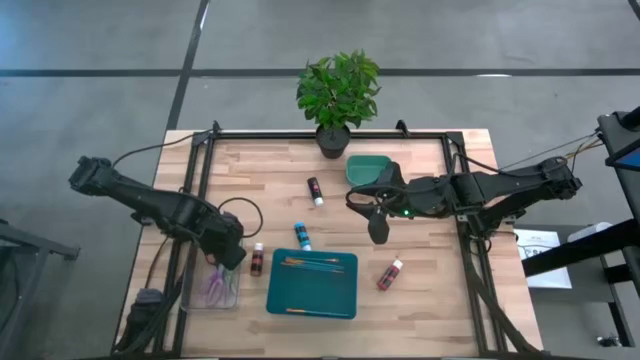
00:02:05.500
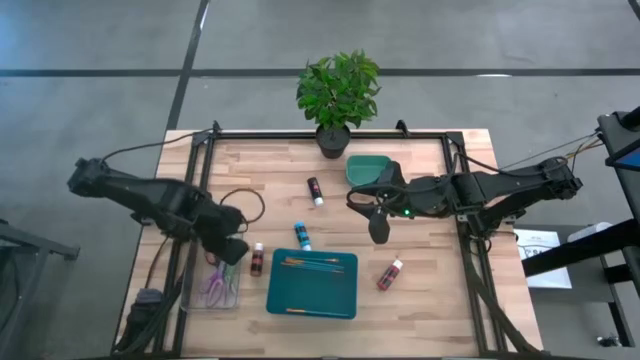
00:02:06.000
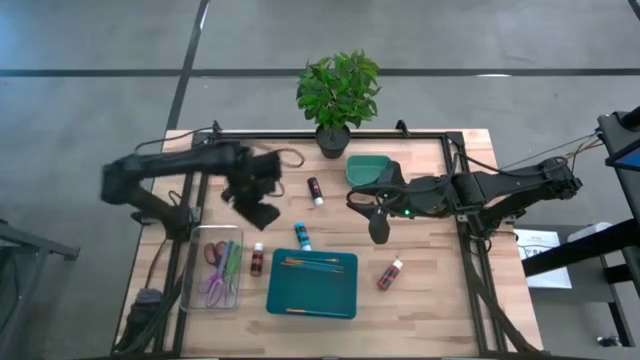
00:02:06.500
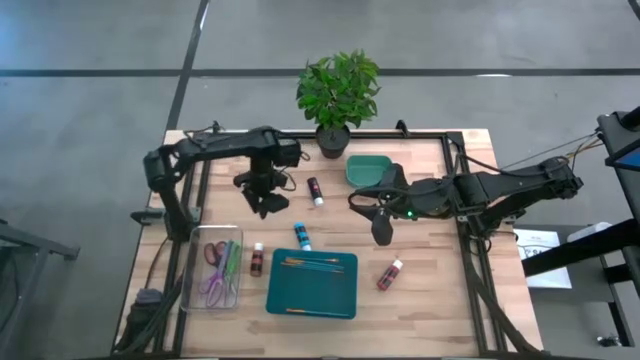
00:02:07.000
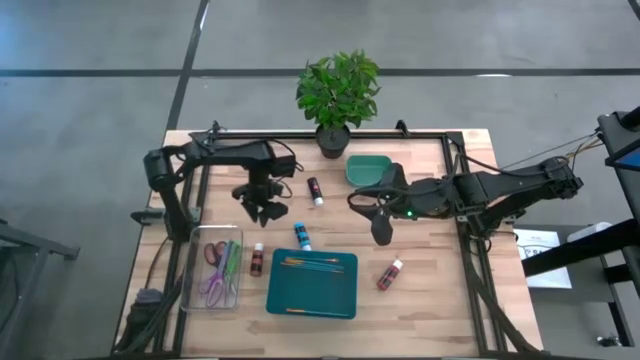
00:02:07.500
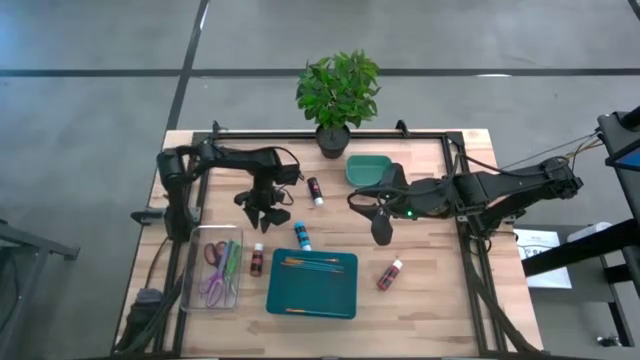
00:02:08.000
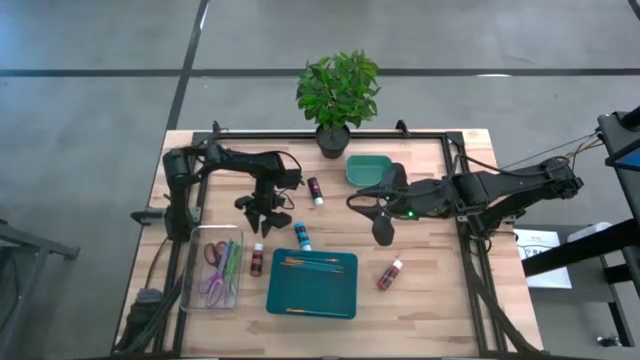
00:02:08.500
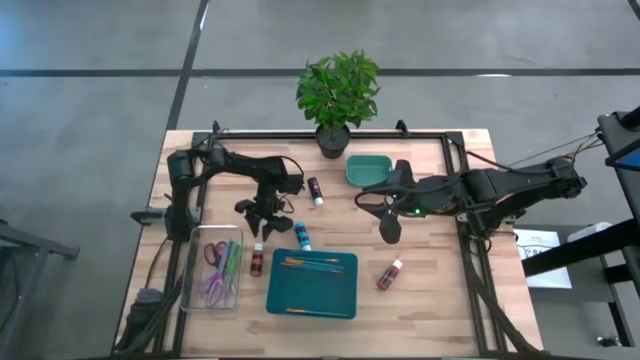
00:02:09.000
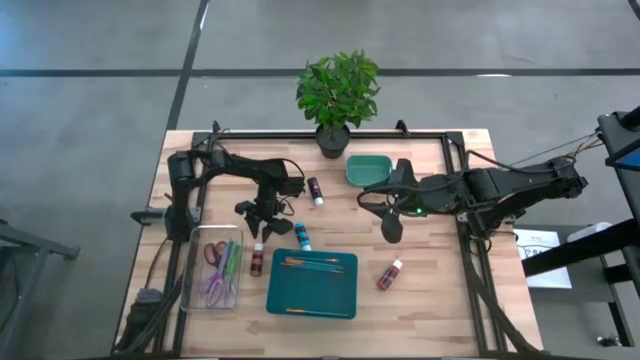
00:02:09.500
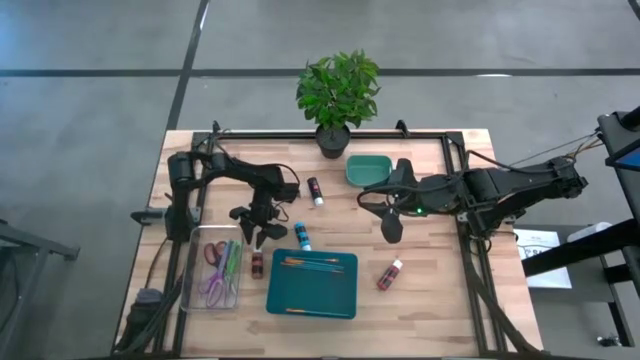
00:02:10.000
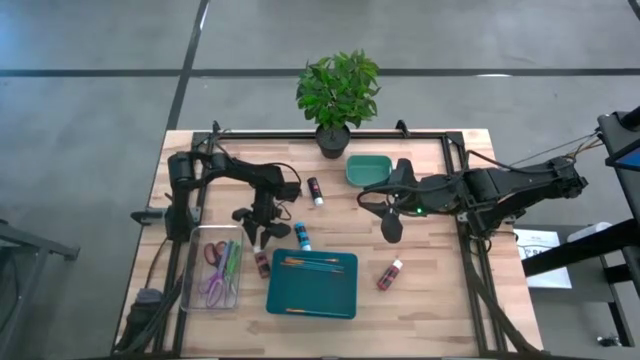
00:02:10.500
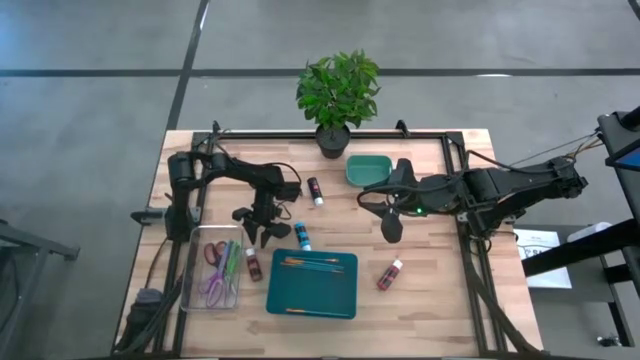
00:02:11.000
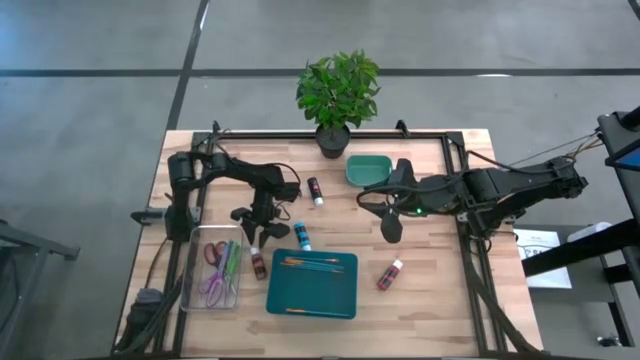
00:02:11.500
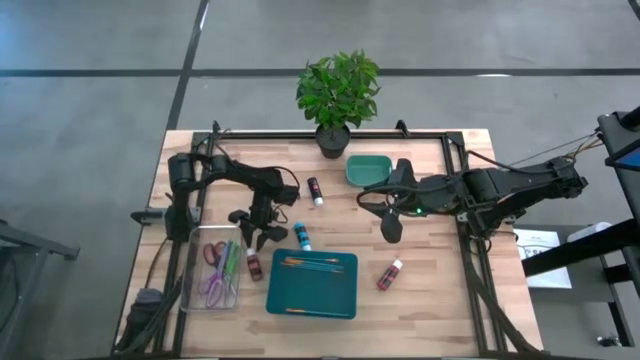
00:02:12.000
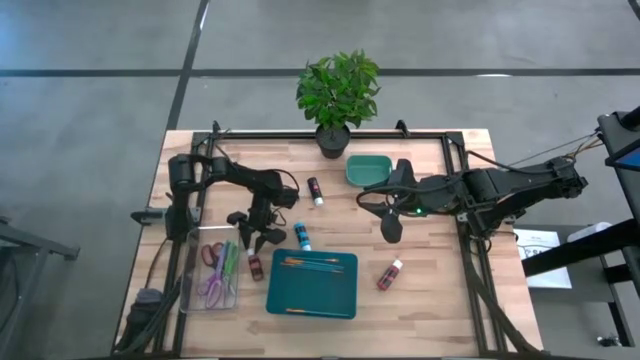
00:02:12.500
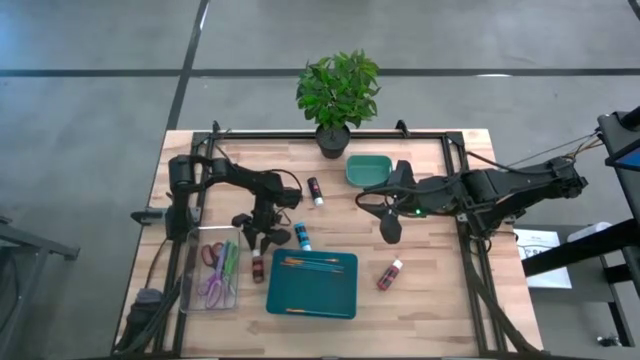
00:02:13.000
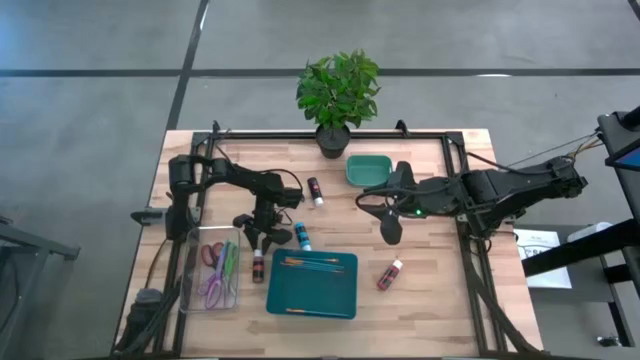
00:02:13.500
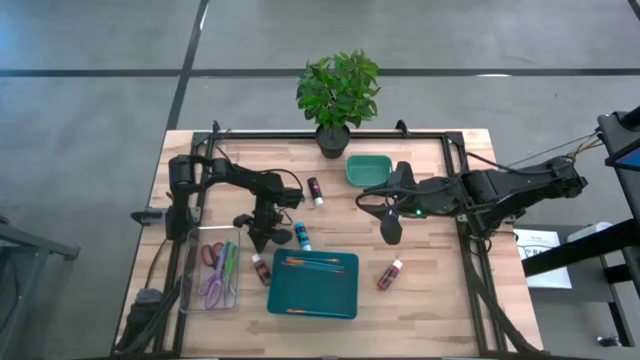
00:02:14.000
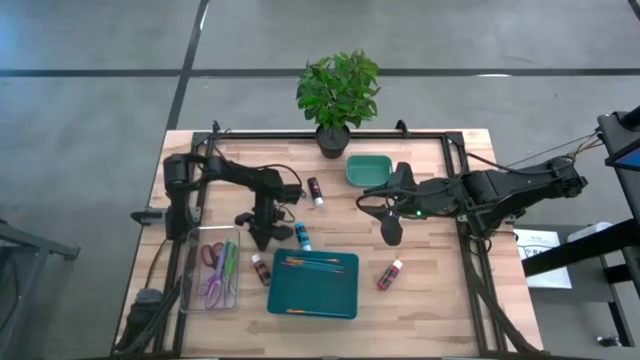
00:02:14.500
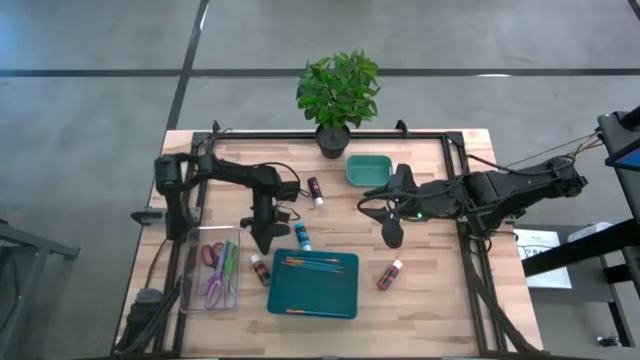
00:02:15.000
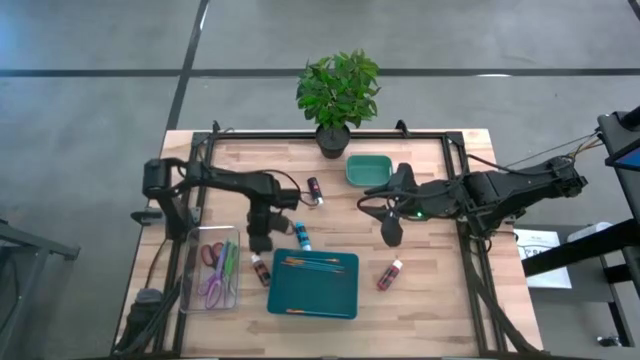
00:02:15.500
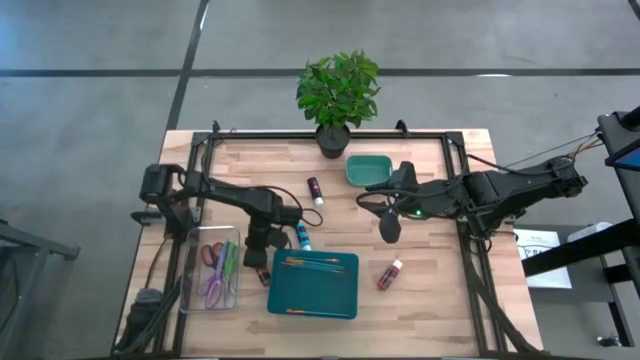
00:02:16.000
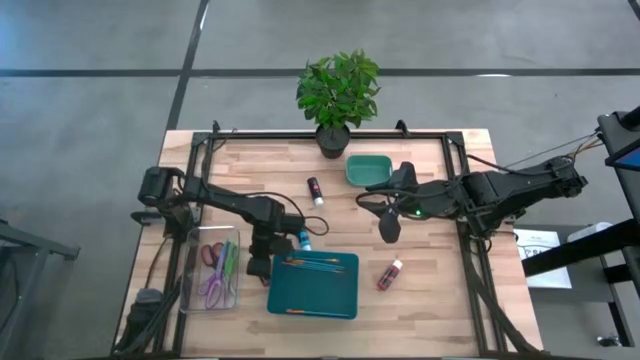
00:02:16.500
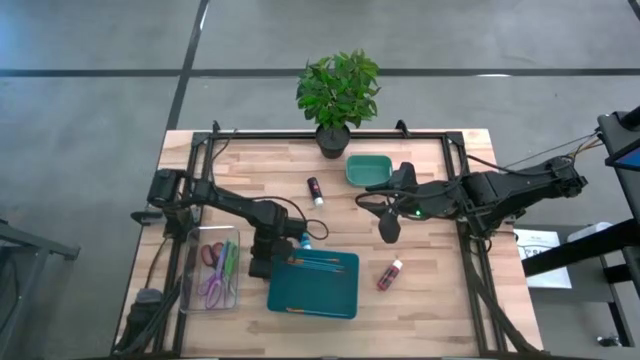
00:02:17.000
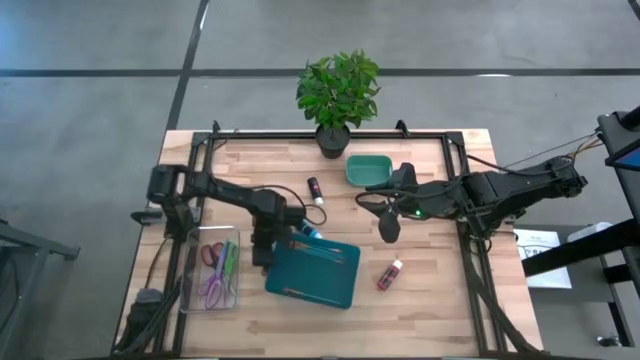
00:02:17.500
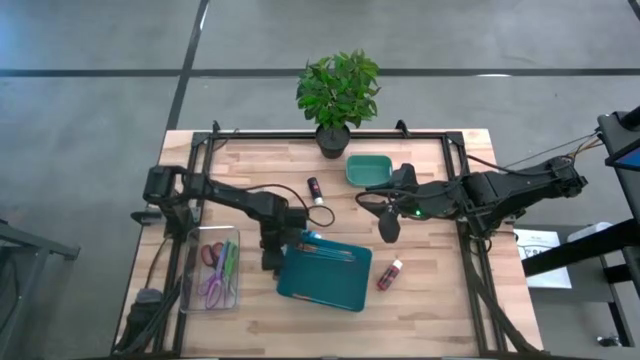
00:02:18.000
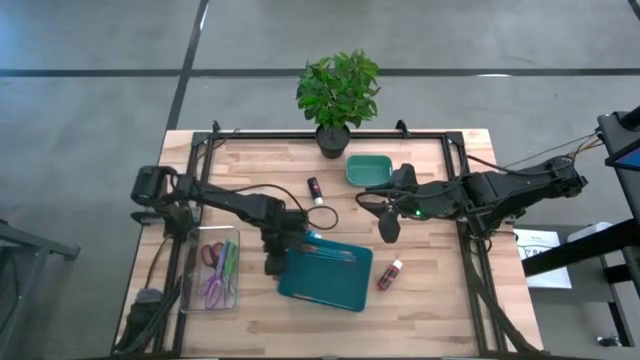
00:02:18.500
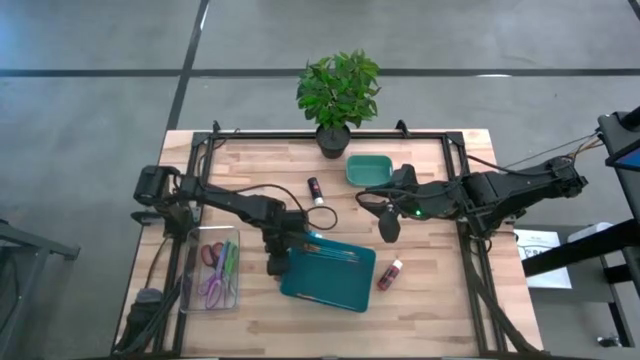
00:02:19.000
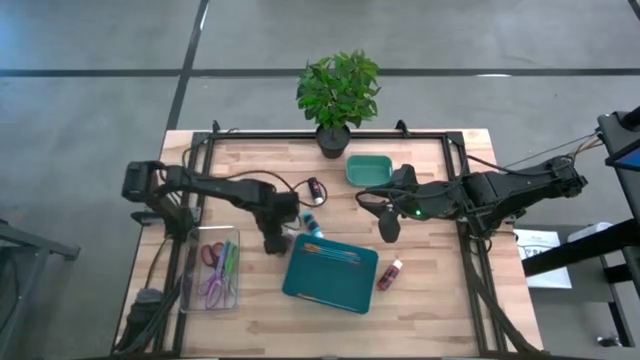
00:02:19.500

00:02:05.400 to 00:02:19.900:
Task: Pick & Place Paint Supplies
Put the brown paint bottle into the green bin

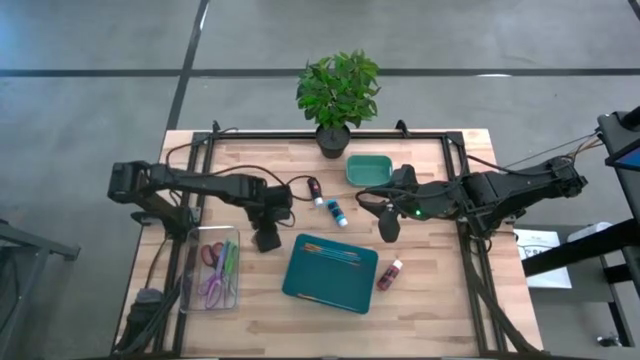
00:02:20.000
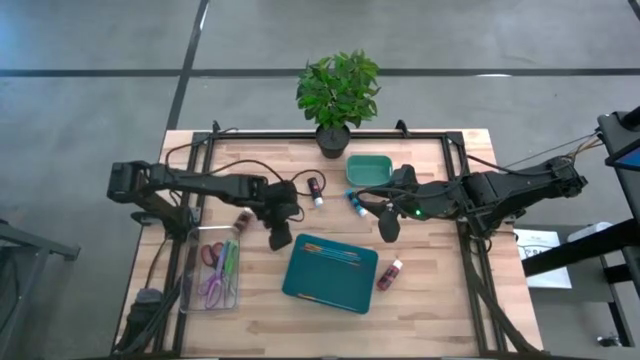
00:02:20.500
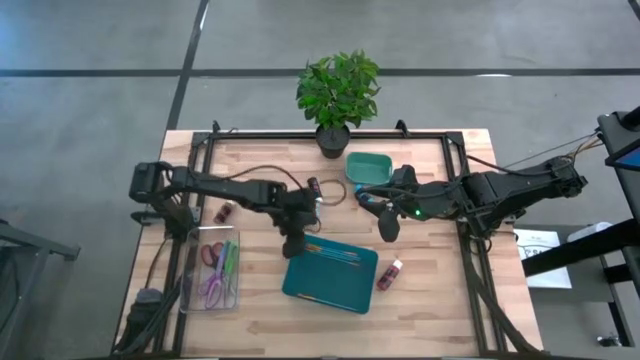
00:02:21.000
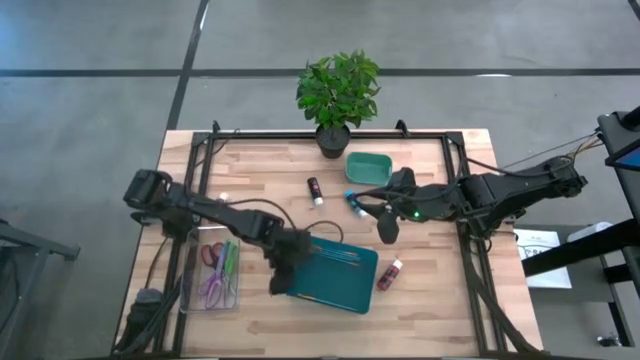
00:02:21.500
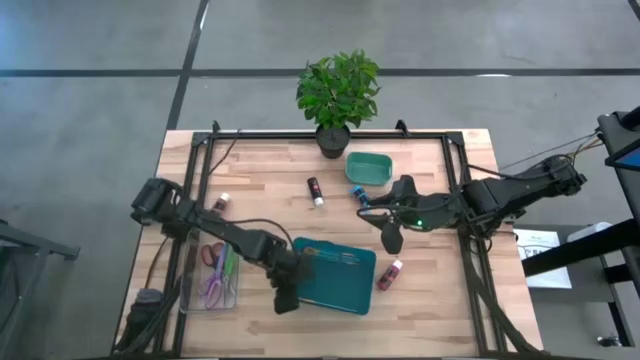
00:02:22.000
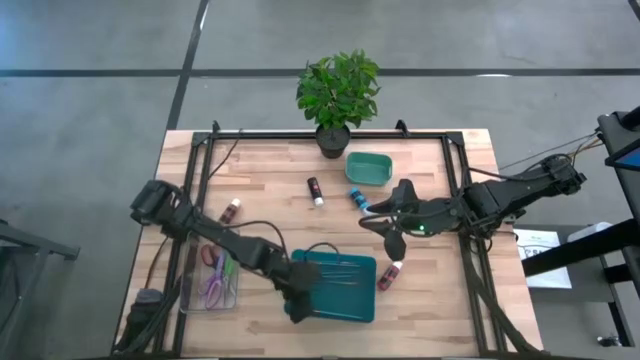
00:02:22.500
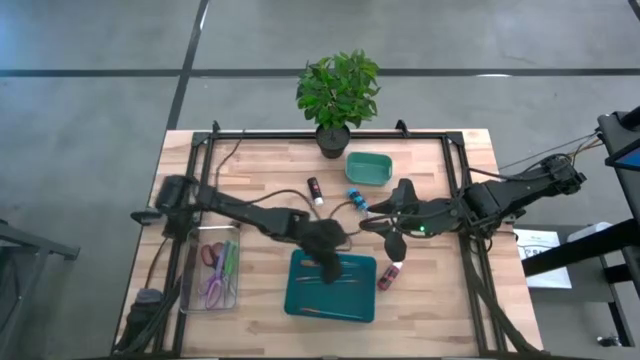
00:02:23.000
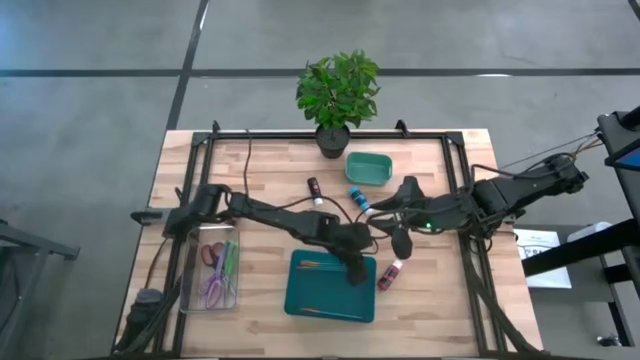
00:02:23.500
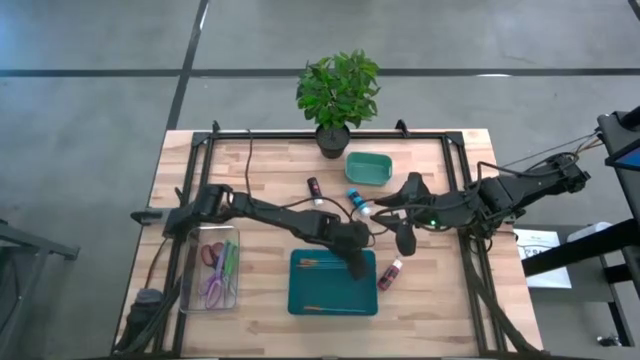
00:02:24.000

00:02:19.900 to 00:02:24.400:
Adjust the blue bin

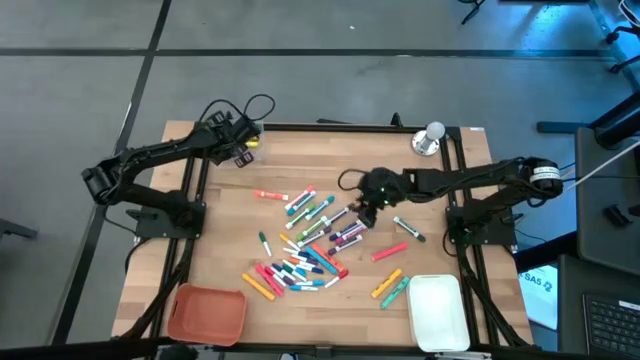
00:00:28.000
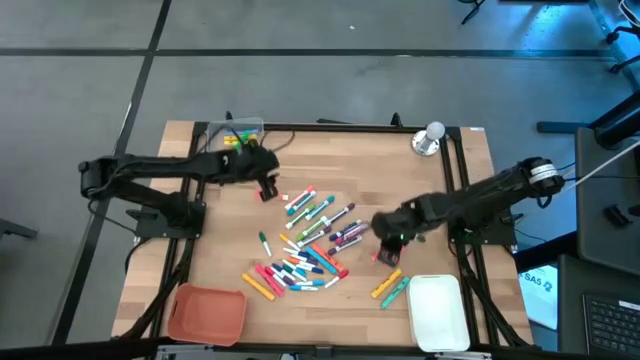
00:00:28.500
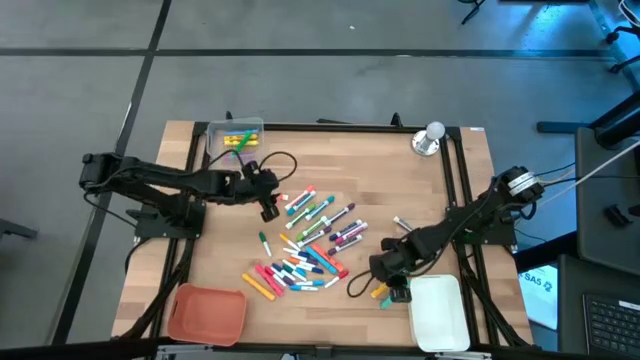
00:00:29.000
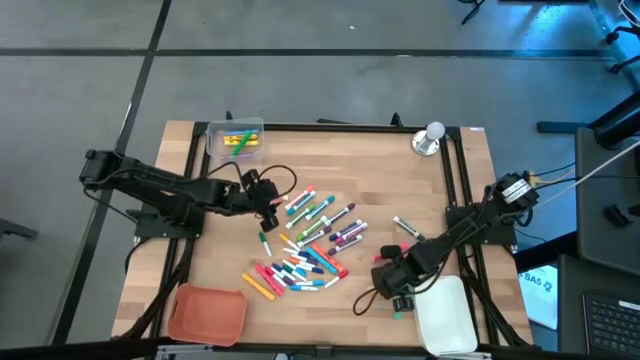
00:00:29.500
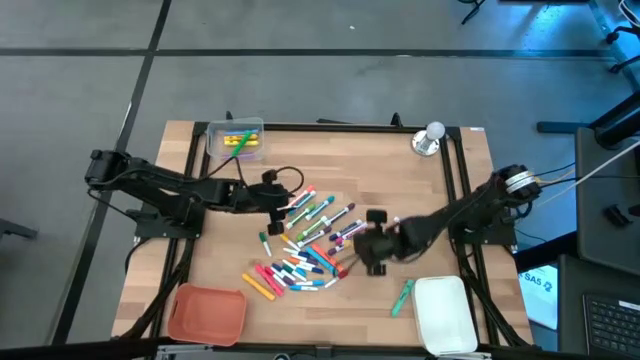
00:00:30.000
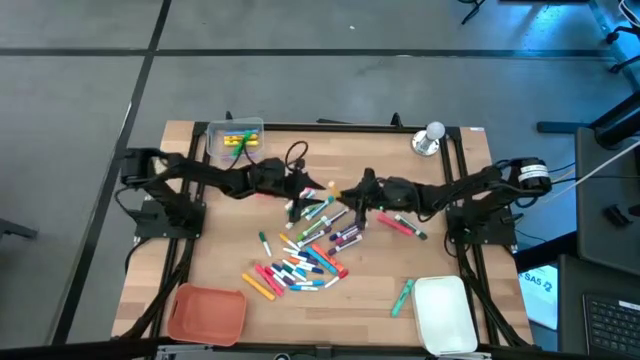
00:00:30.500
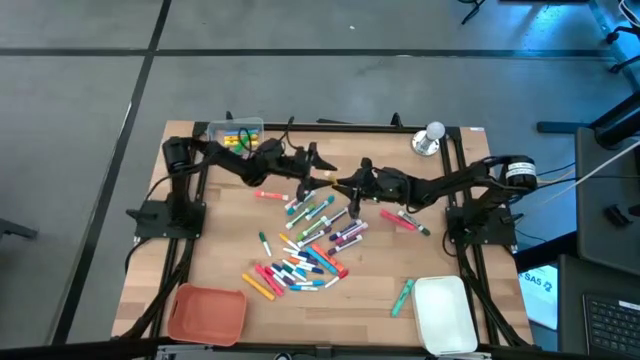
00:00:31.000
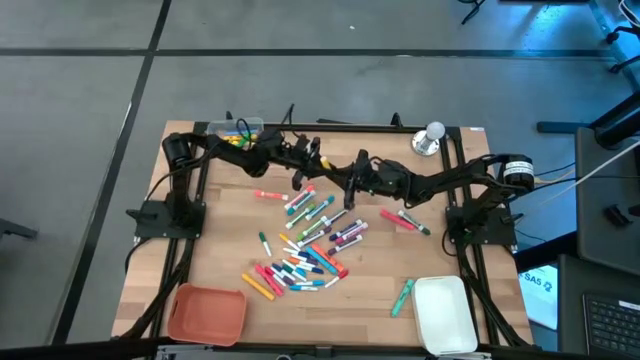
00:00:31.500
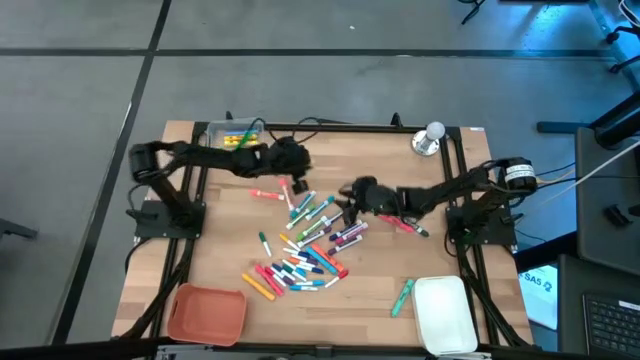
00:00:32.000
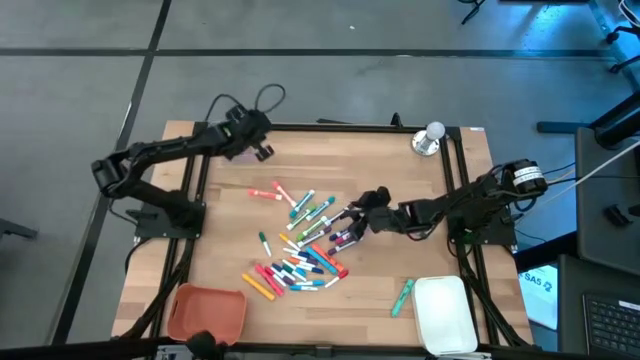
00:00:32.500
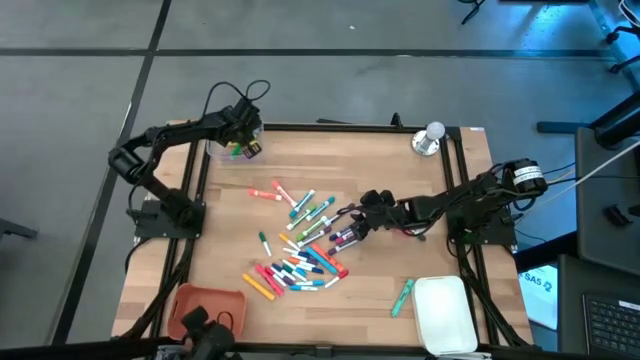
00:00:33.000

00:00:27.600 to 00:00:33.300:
Task: Pick & Place Markers
Put the yellow pen into the transparent bin
